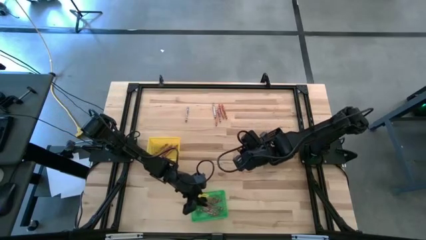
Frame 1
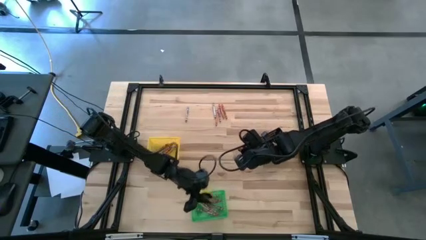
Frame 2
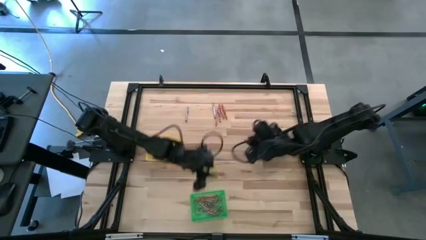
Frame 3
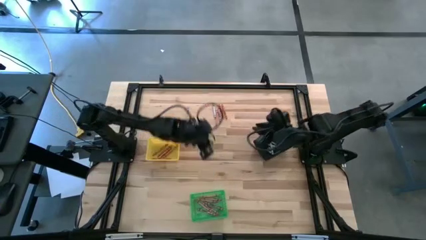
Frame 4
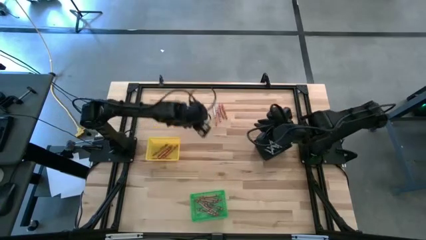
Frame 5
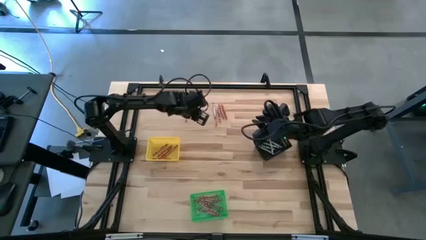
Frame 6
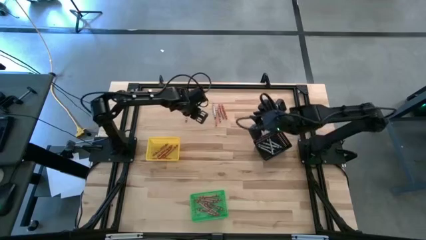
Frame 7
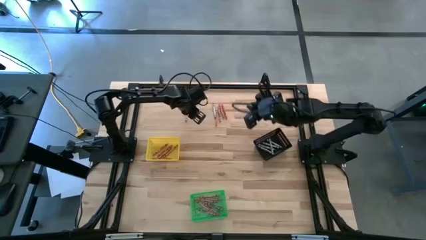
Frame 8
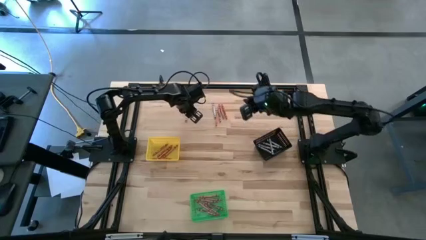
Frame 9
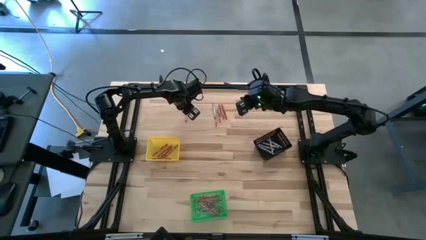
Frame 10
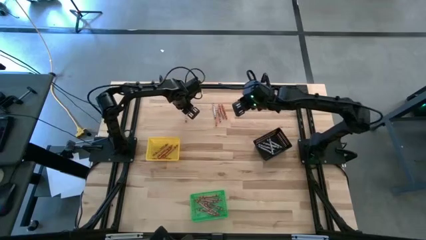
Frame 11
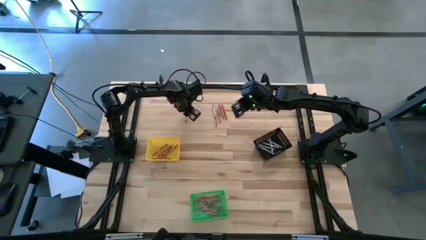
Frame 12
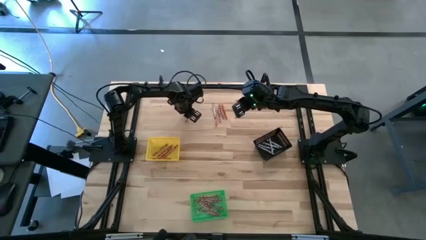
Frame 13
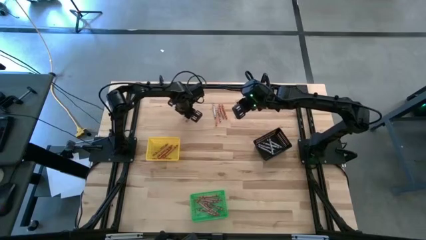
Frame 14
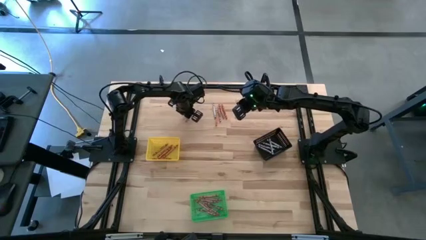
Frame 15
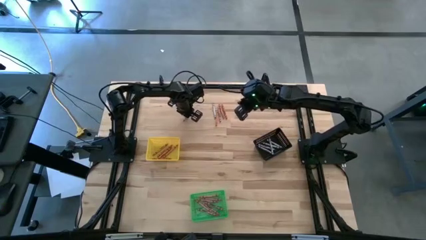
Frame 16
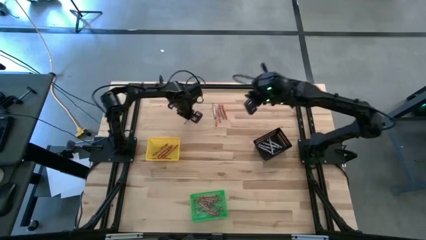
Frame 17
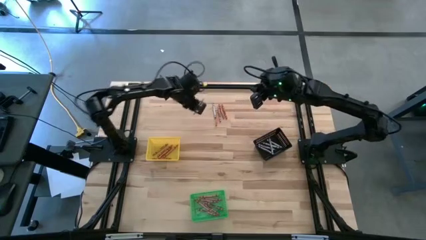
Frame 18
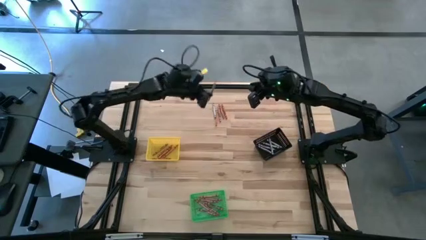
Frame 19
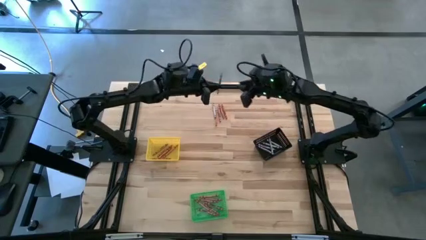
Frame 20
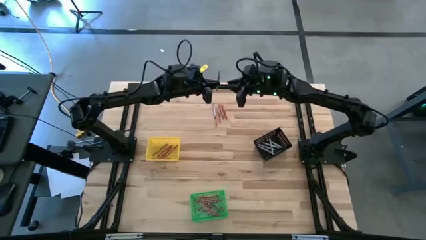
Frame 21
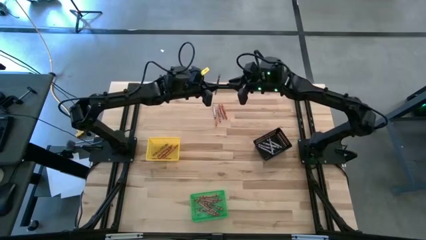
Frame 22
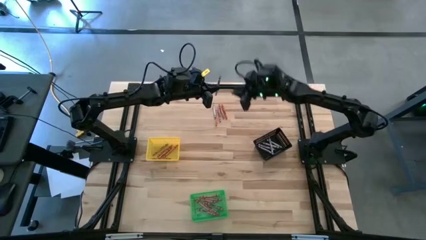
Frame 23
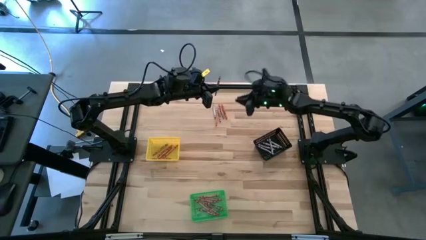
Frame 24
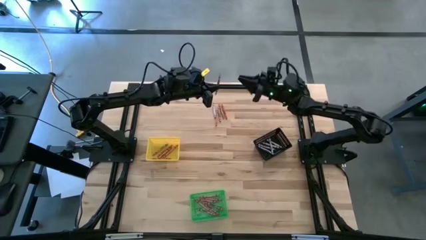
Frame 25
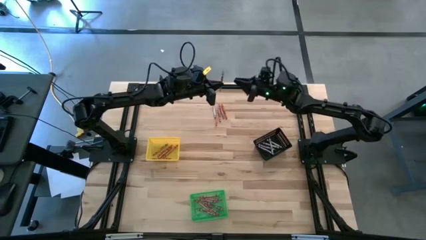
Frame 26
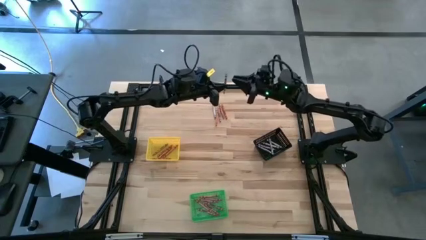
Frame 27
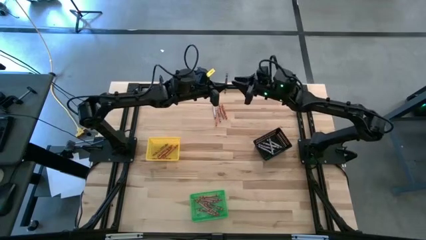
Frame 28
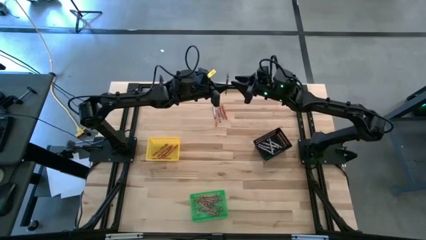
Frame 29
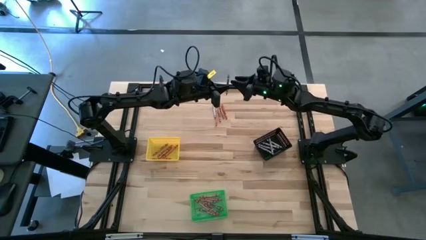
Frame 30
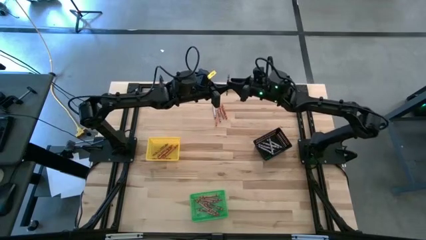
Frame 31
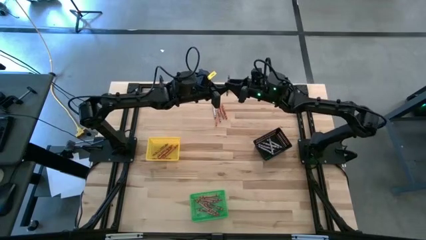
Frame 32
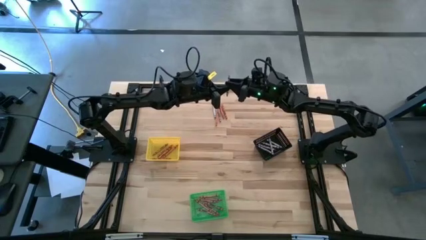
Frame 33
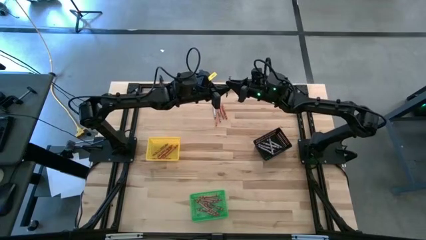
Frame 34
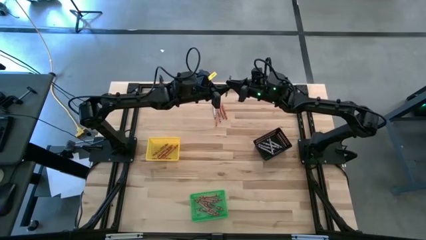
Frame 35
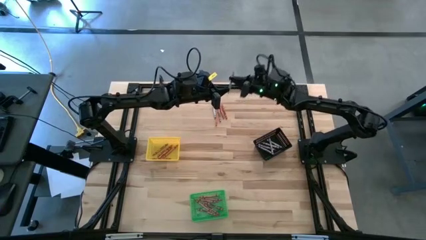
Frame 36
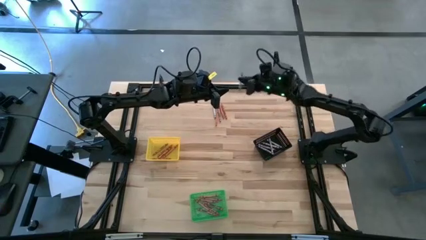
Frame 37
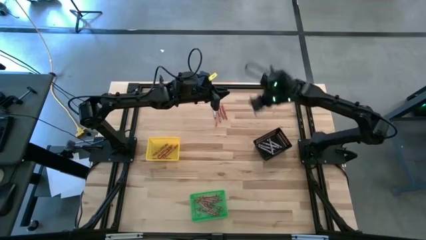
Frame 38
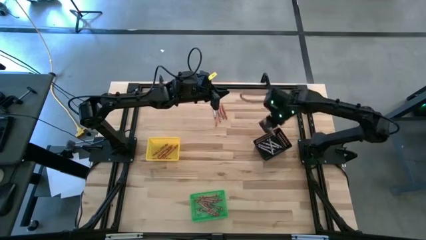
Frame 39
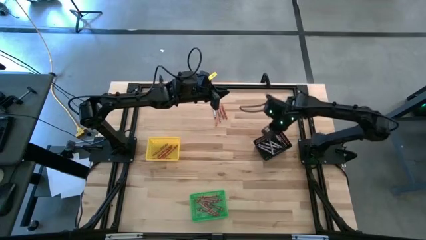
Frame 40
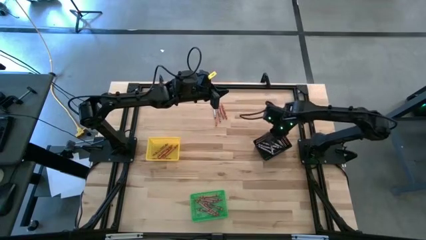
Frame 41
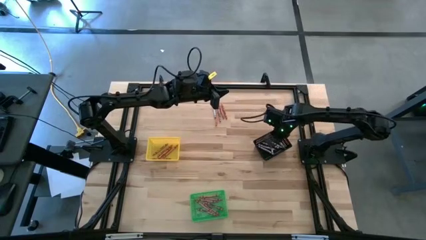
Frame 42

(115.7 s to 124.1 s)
Task: Sort crayons
Put the left gray crayon into the black bin

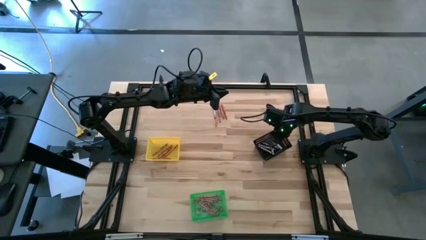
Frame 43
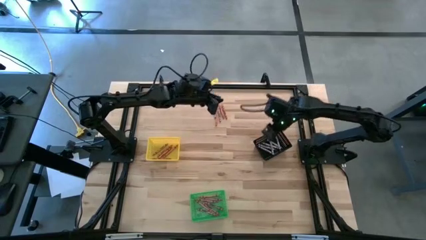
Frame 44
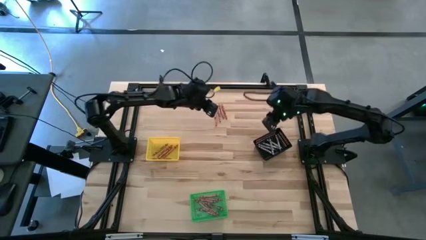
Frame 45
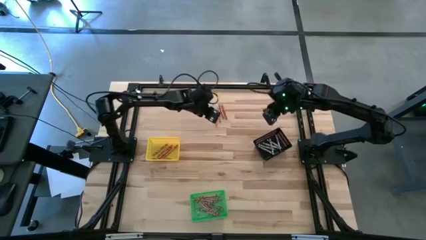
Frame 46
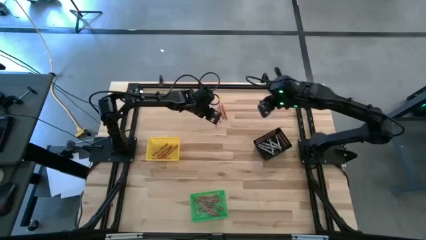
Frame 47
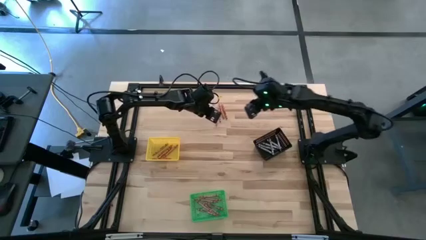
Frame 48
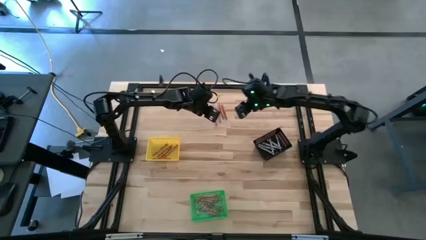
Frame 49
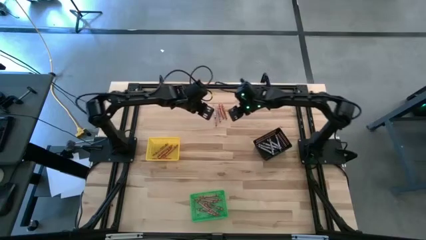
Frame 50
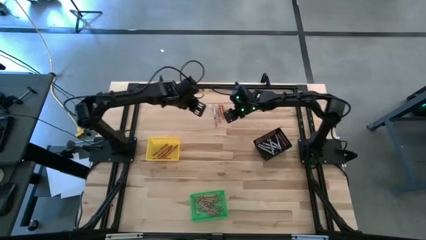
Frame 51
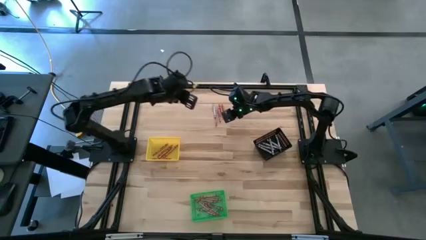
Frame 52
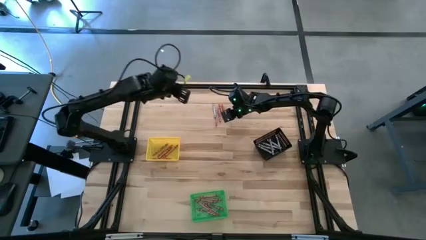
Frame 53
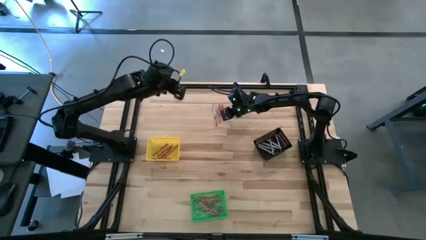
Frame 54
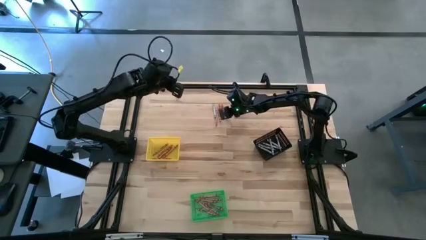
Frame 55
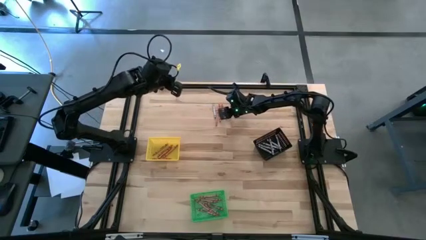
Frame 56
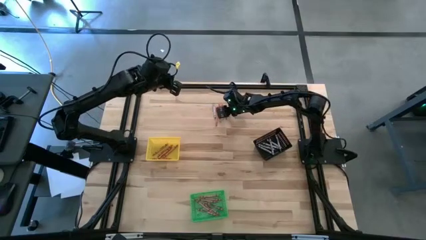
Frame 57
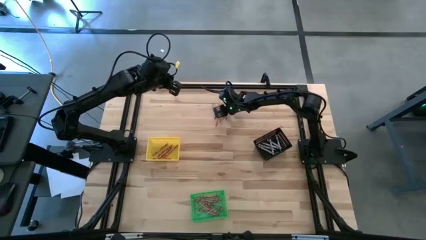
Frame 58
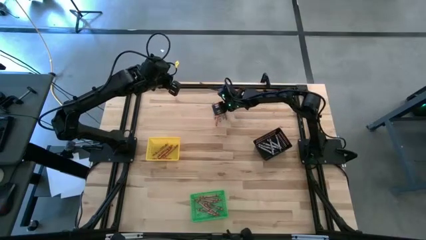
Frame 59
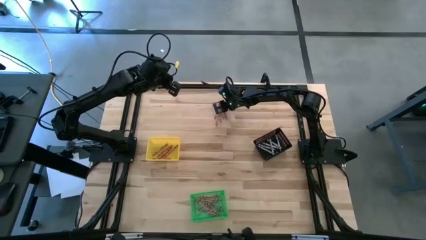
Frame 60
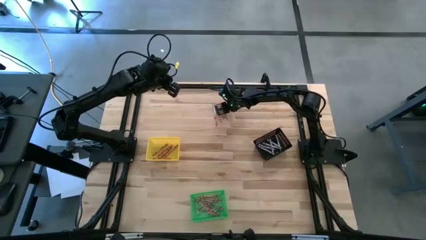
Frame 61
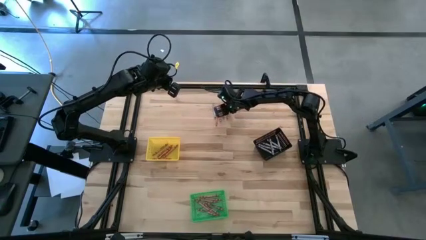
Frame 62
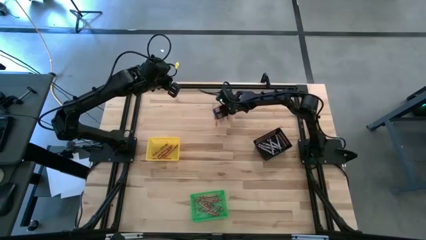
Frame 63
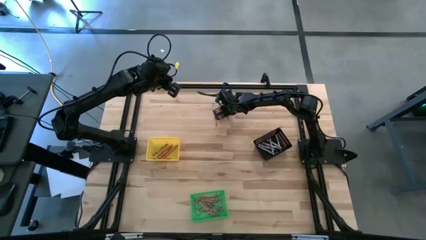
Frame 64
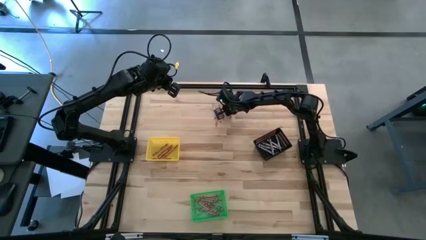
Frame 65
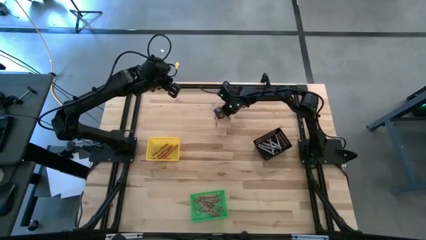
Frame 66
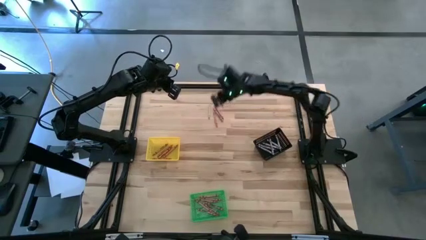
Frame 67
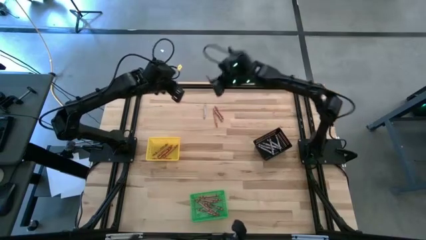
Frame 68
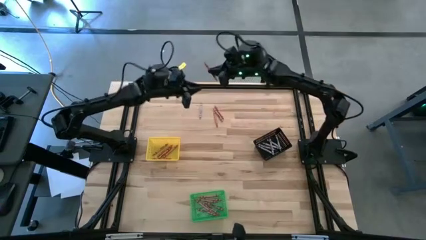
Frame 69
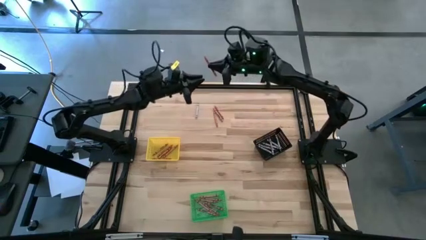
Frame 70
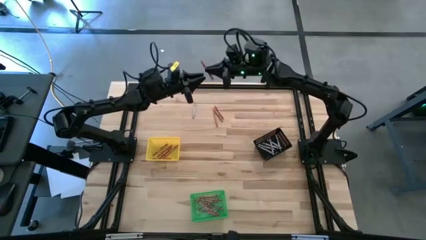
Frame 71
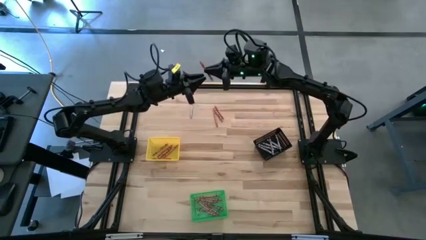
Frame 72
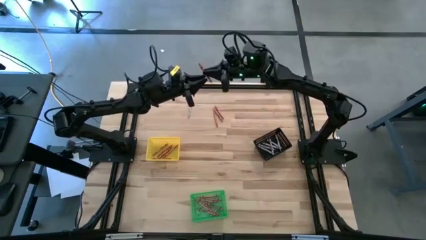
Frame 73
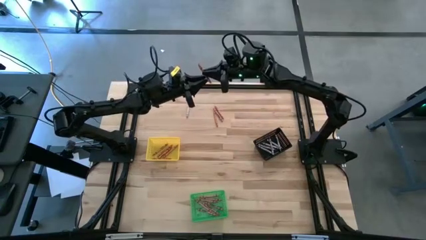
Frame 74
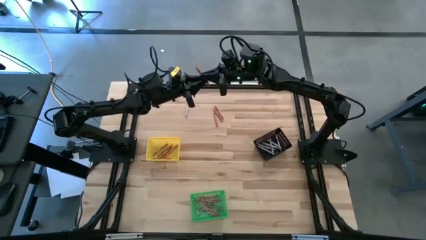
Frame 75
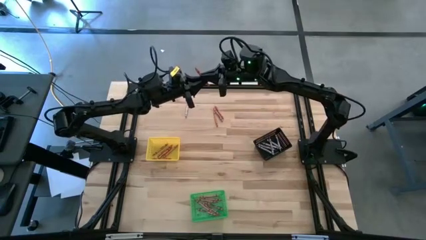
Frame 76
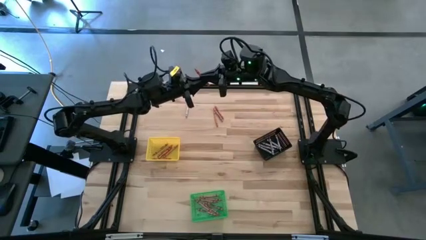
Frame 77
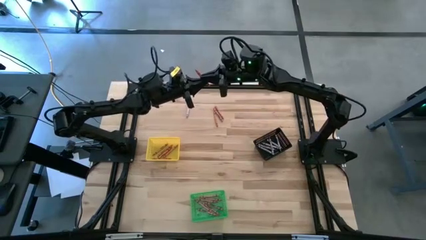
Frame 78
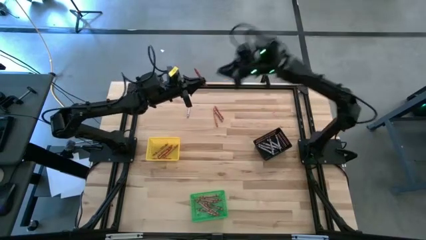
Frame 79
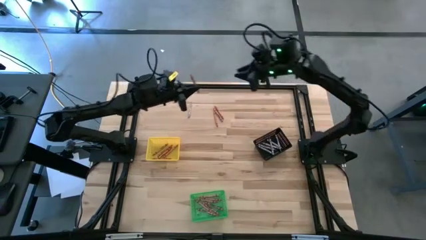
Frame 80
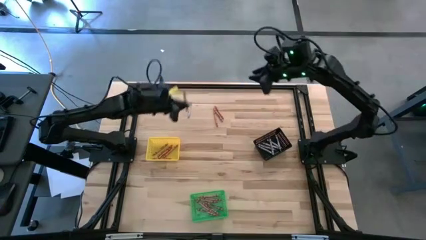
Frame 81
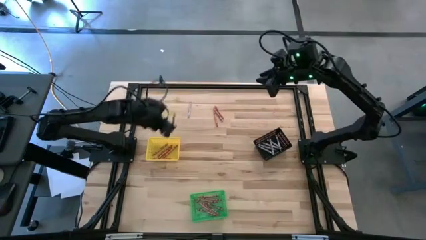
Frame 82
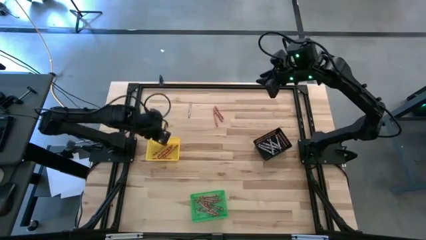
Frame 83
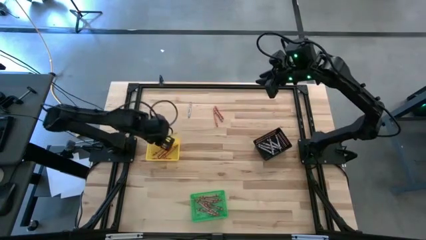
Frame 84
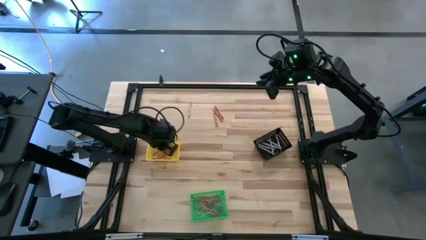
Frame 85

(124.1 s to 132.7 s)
Put the right orange crayon into the yellow bin
